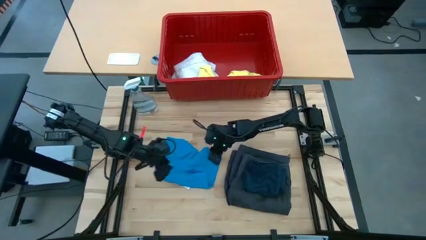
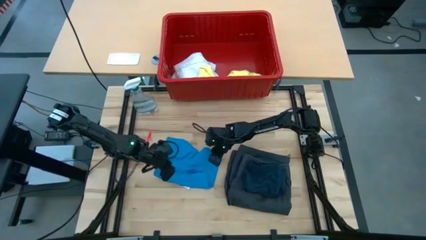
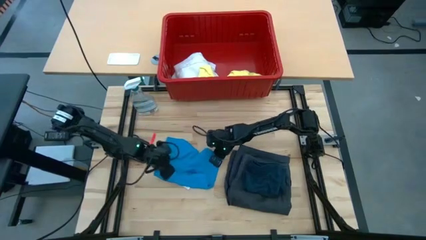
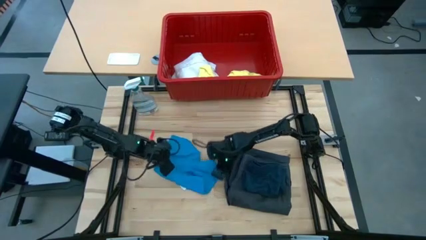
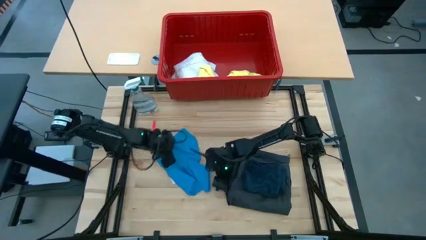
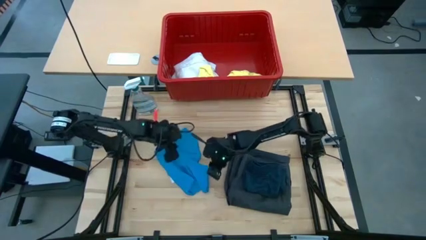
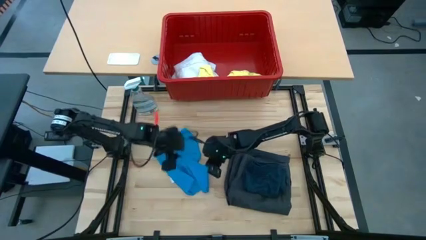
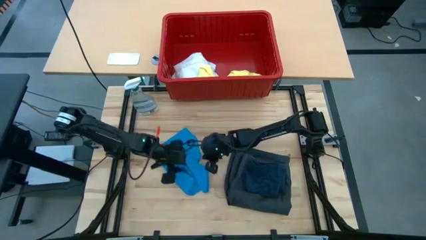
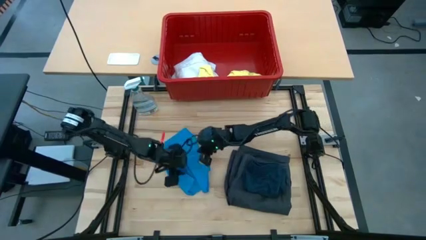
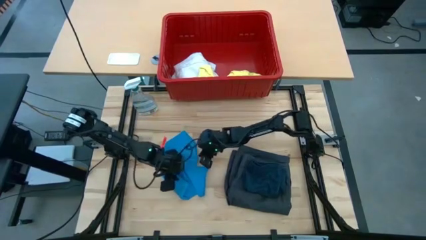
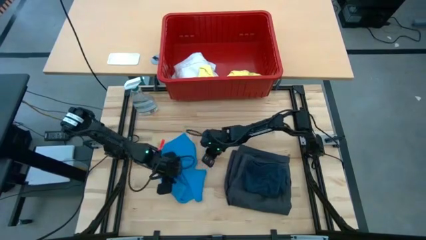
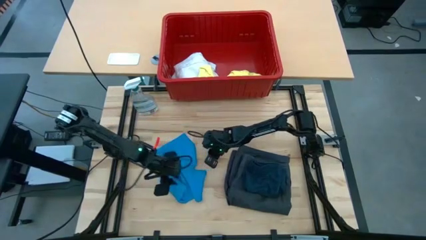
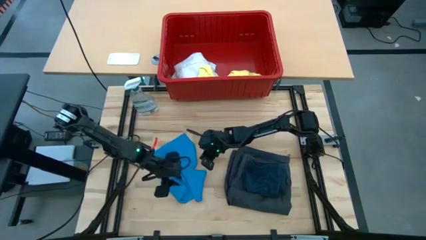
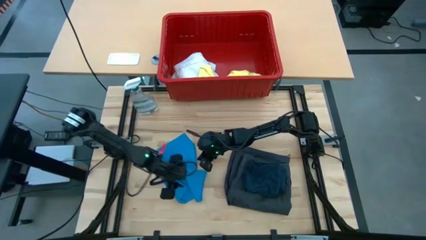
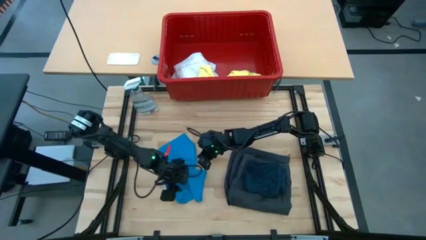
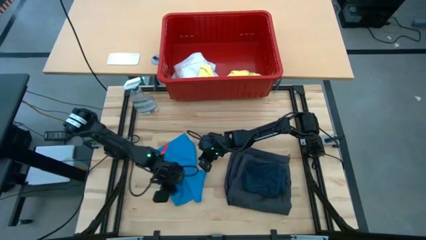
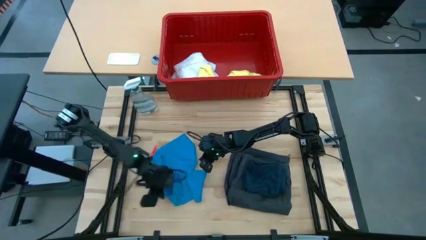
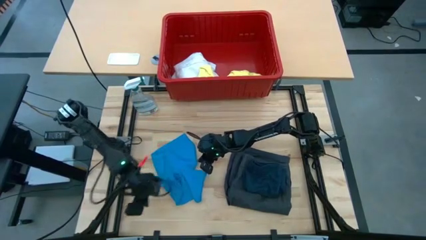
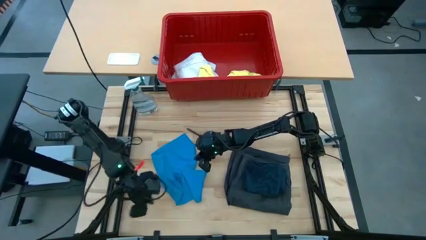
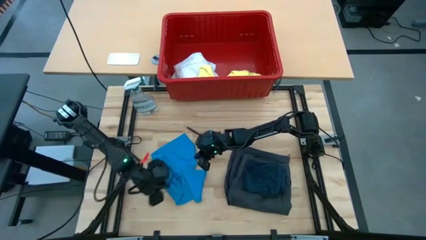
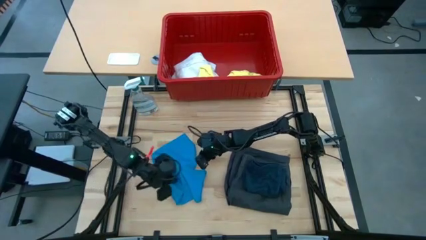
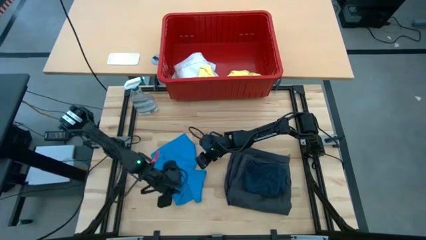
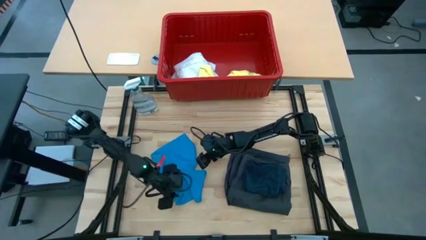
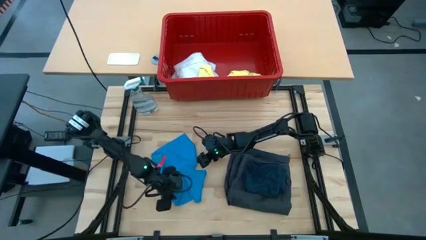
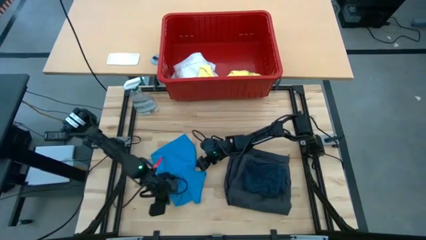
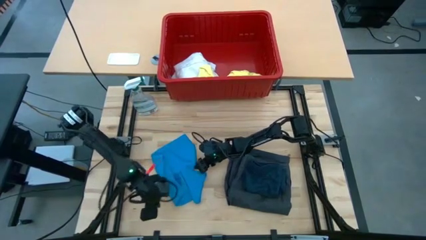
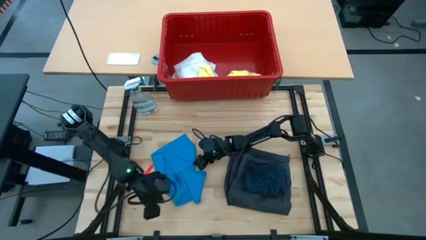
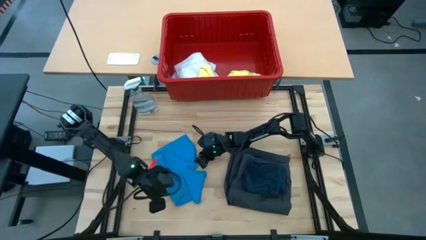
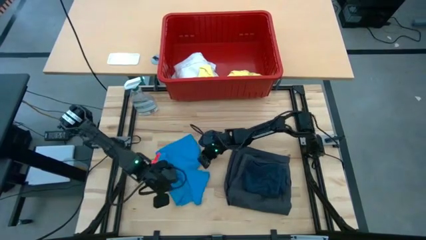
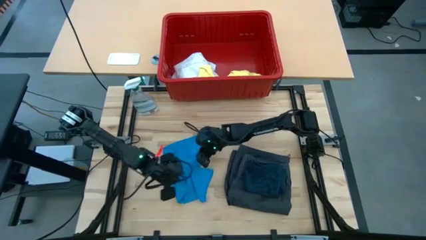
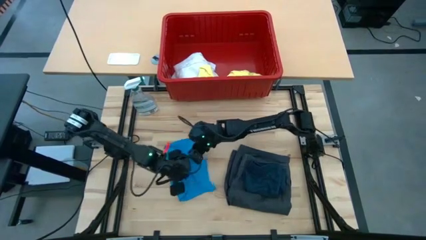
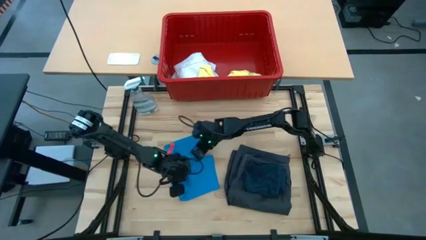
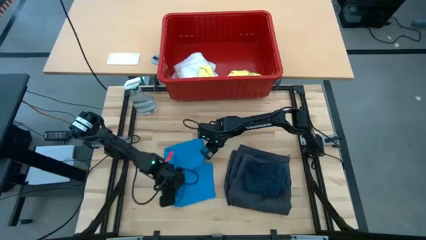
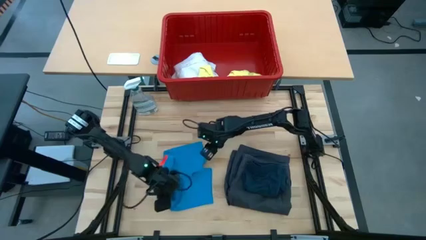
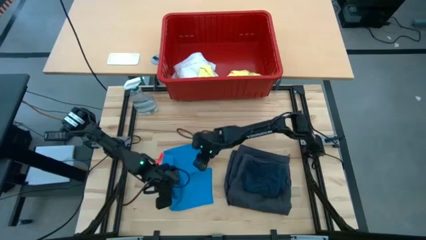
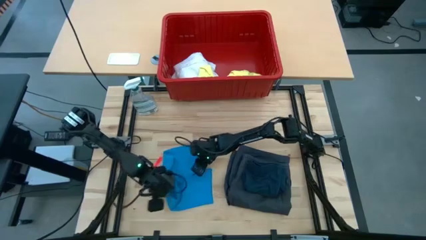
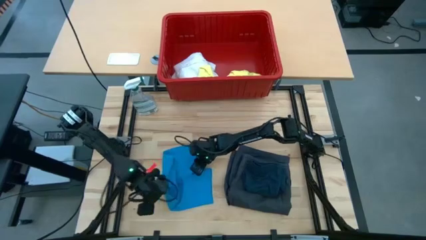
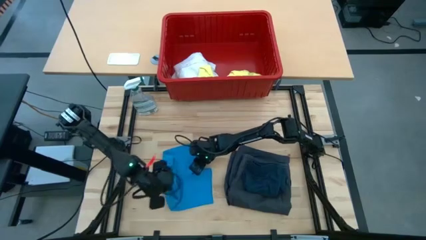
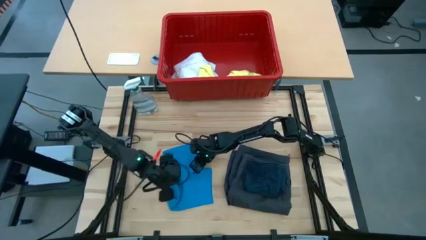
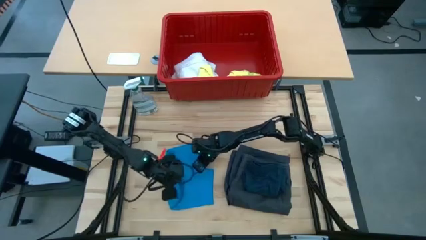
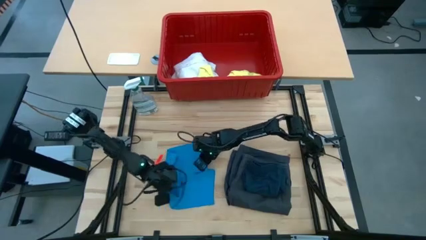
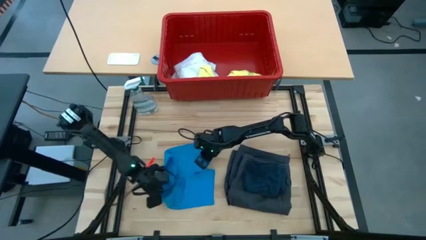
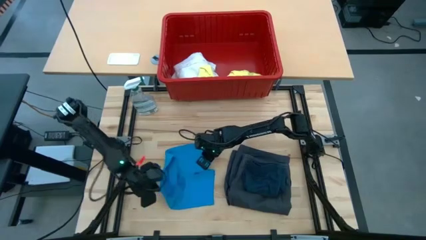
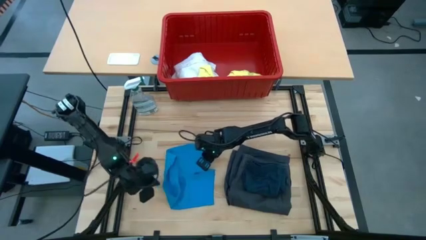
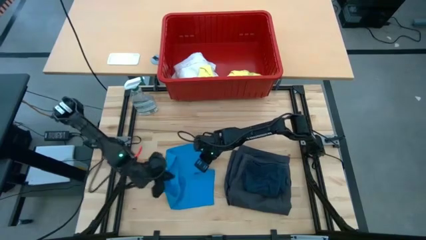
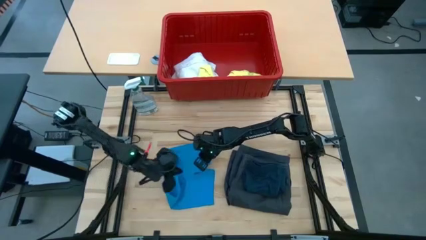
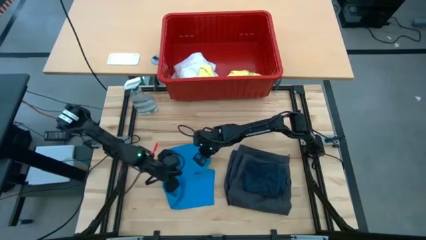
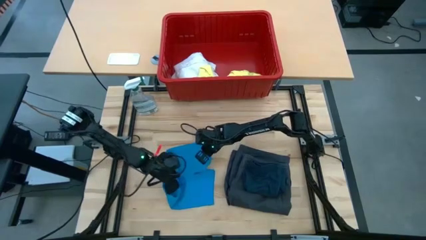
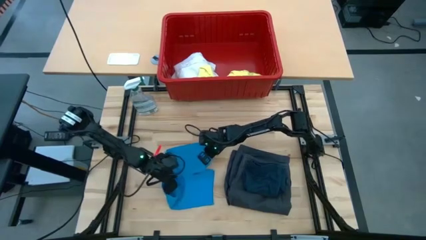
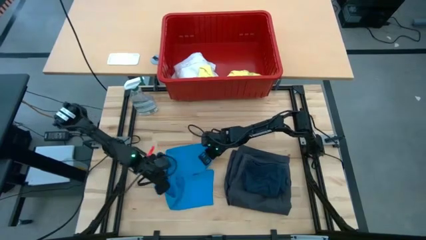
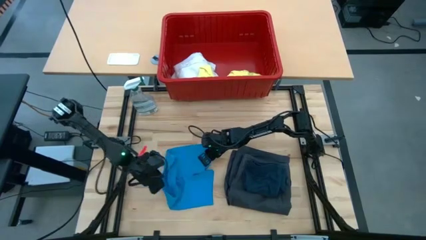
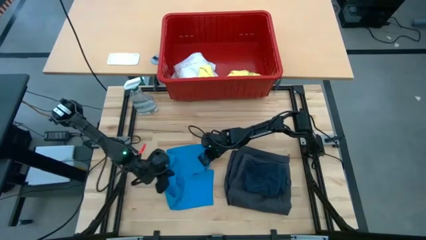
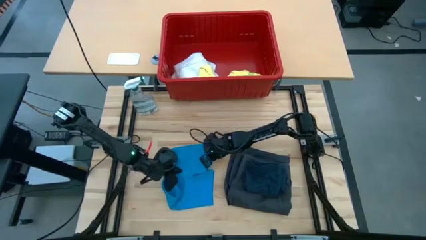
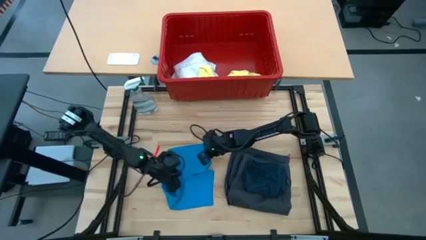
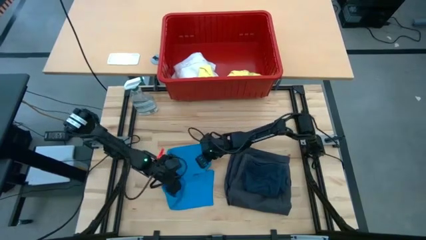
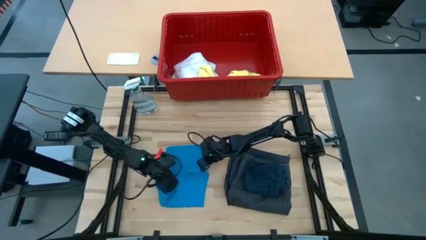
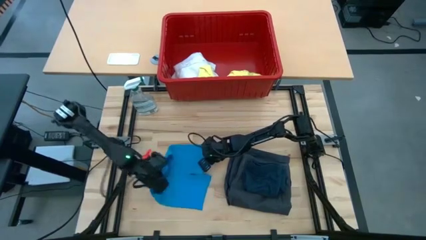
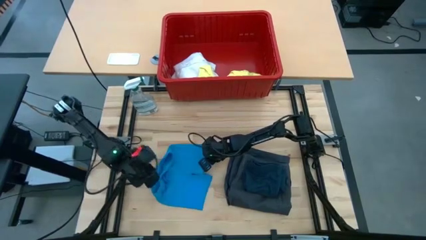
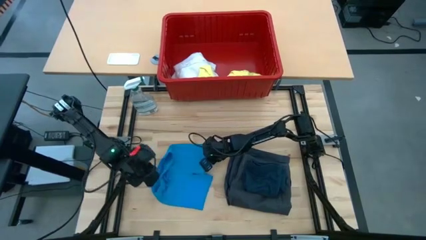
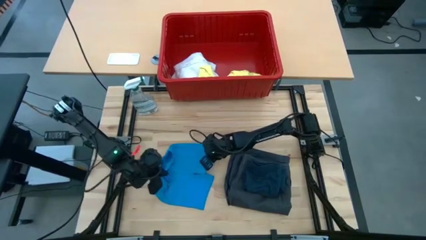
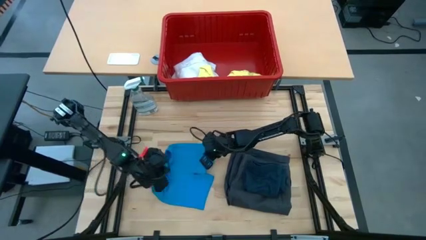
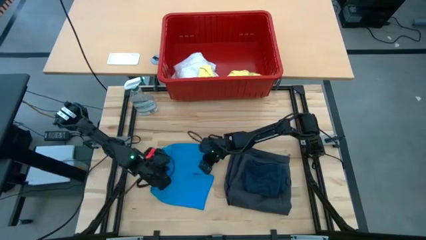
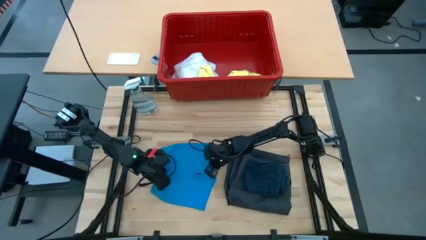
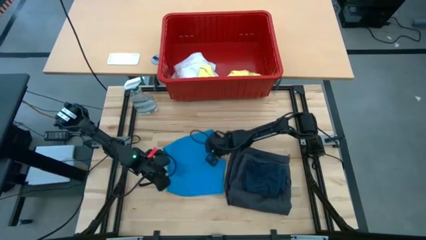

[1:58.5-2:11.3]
Task: Fold laundry
Fold the blue shorts
